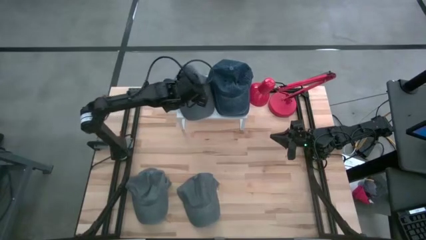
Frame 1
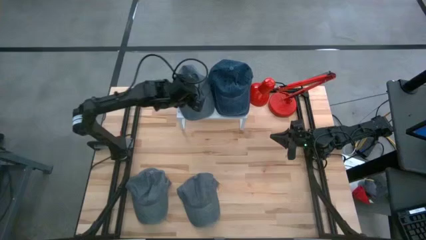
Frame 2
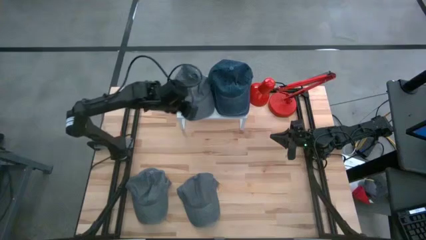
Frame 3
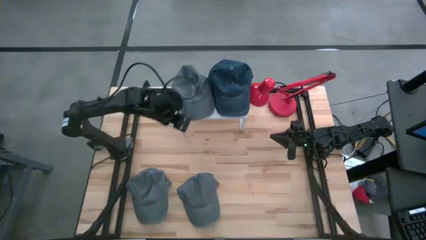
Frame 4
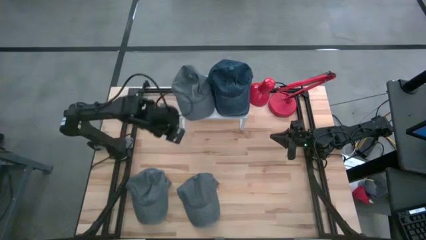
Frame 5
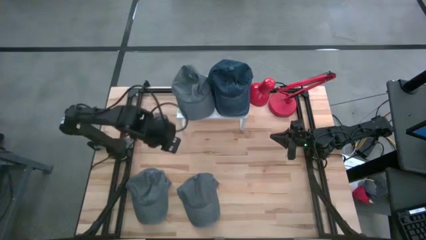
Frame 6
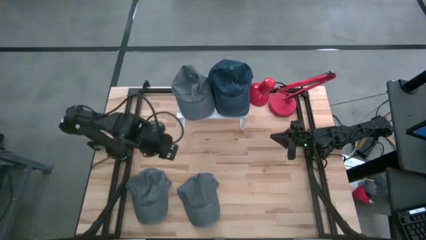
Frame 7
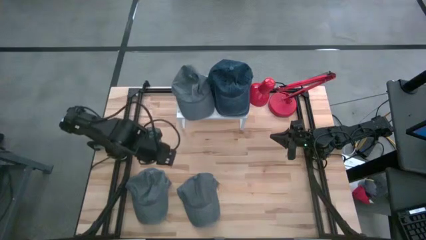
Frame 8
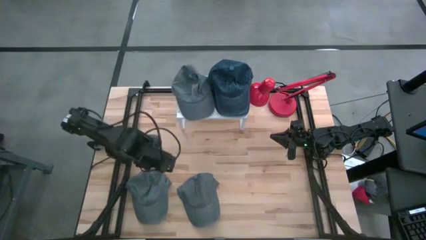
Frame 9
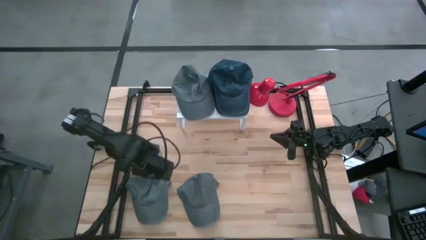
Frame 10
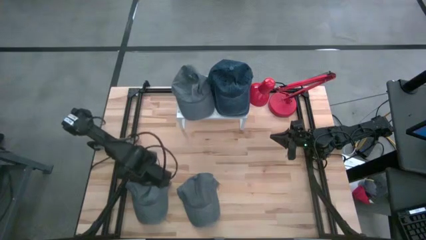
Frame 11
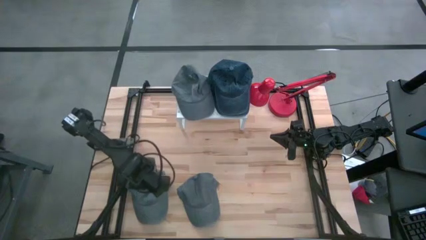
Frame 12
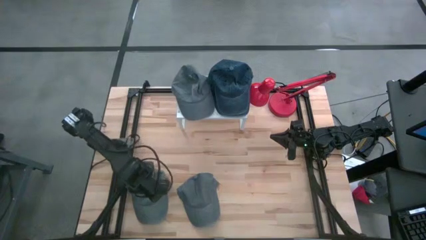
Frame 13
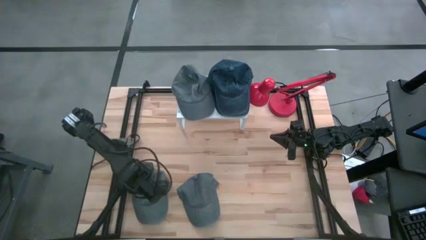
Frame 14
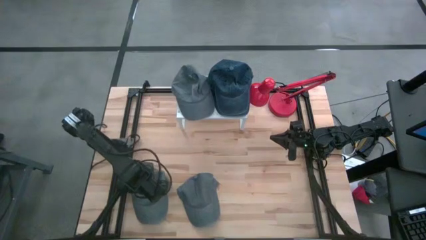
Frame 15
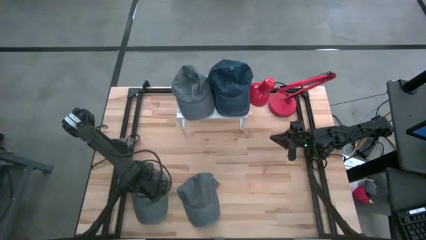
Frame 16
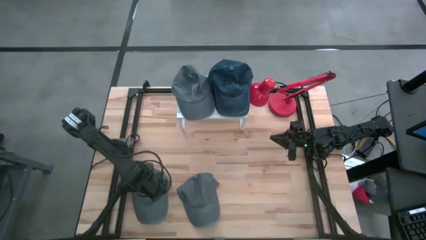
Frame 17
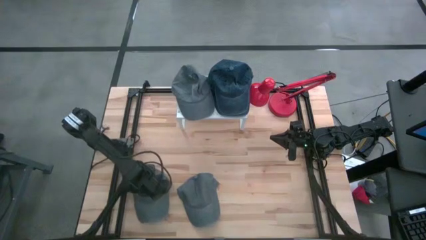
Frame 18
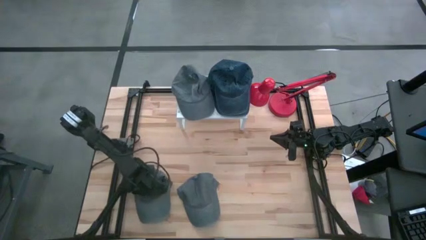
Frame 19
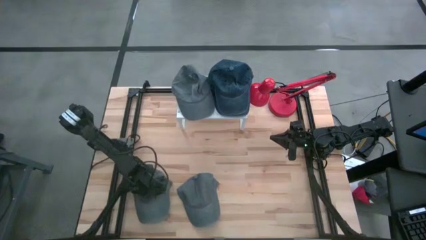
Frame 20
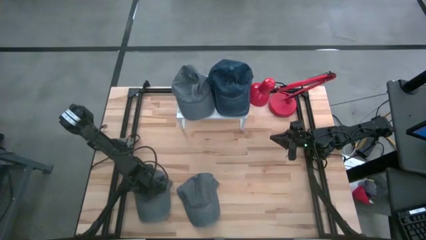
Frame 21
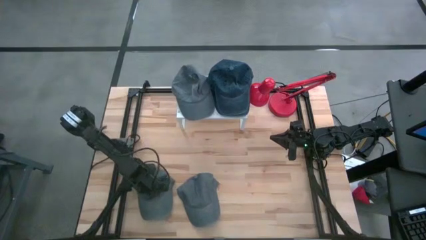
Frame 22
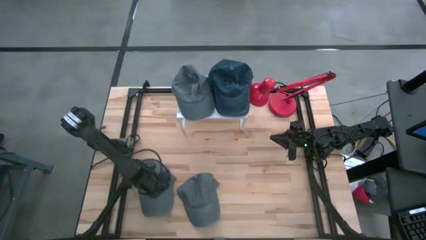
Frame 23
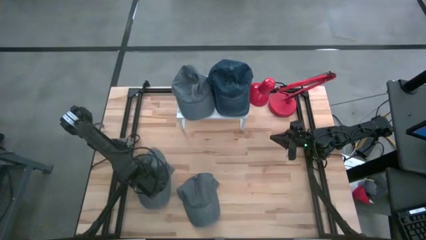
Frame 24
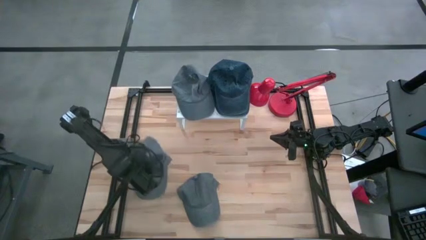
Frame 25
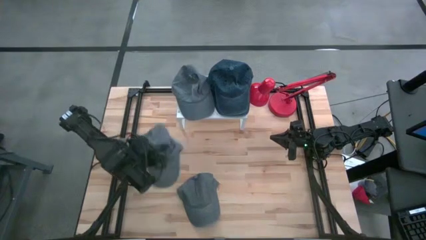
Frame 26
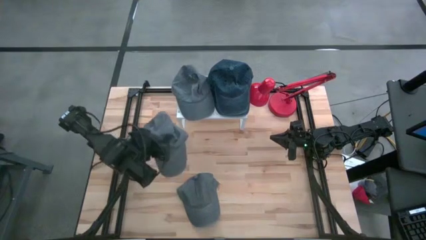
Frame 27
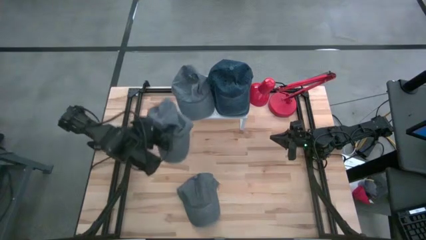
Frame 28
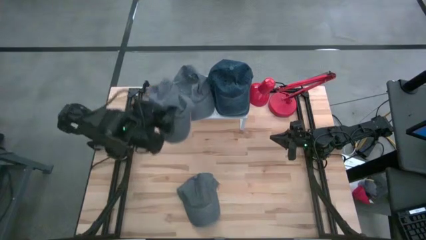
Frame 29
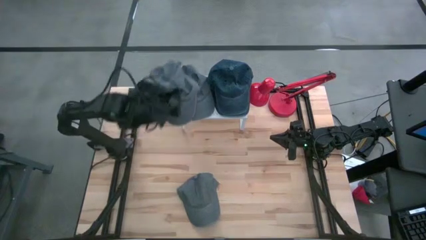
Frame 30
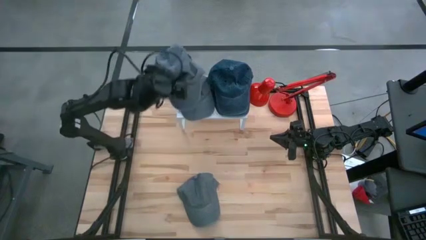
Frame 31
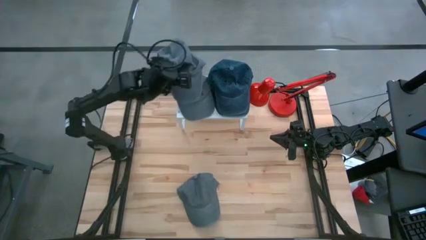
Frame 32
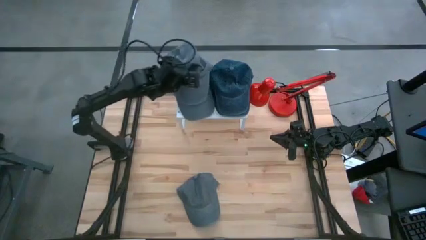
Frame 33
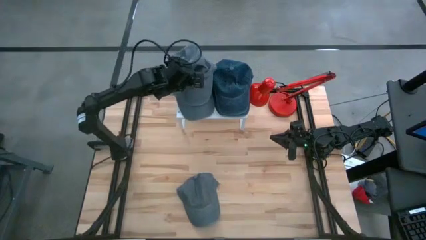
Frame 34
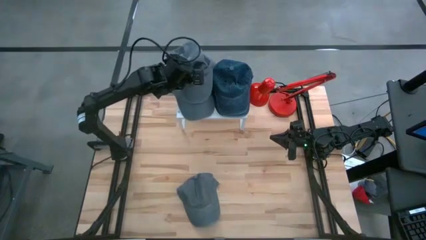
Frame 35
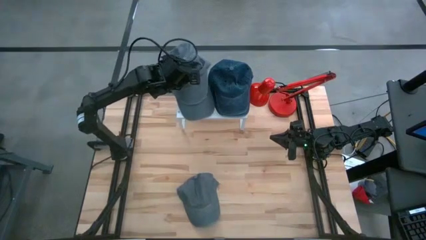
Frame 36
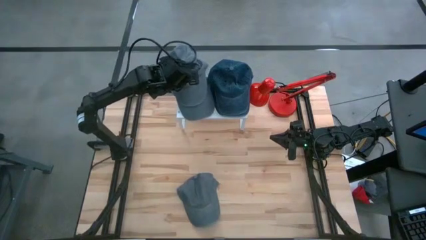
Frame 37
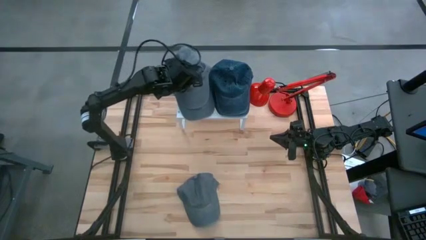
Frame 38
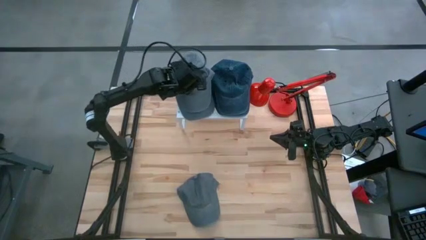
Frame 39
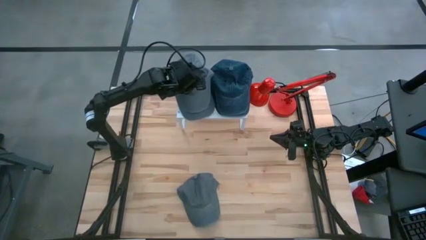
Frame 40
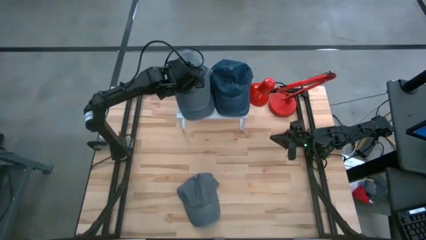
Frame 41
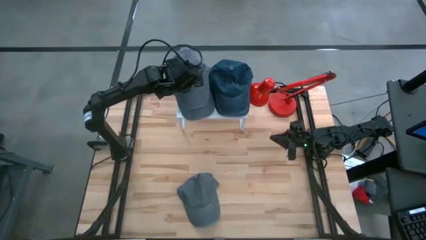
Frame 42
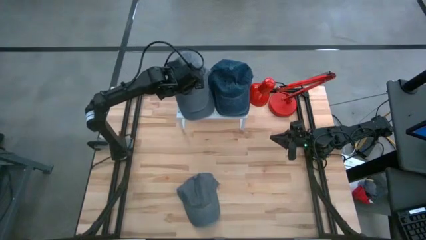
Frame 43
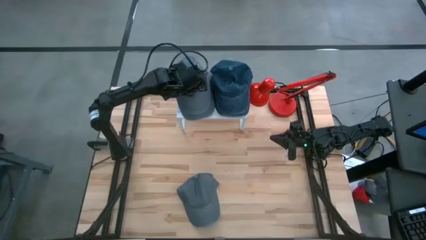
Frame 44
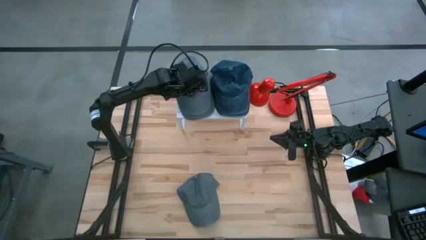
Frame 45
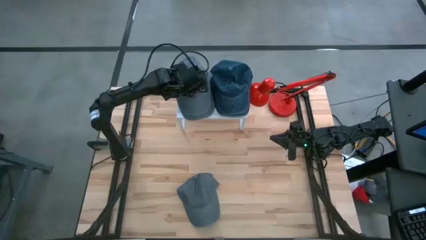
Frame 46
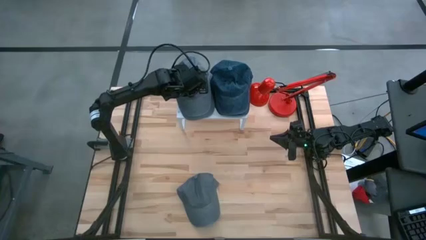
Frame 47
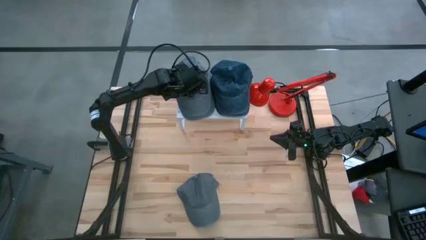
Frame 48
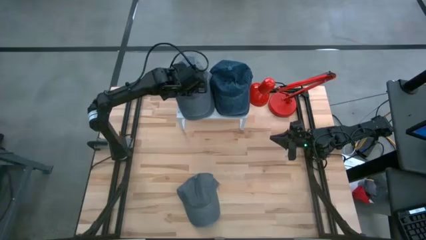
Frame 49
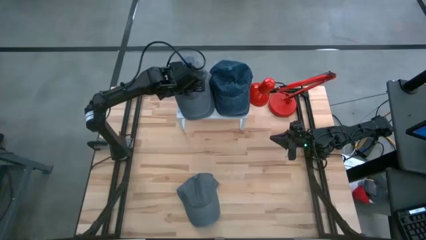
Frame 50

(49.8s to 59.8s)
Task: Pick & Place hat
Put the left gray cap on top of the other gray cap on the shelf

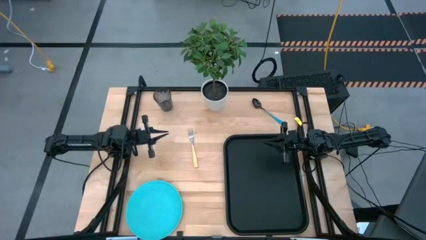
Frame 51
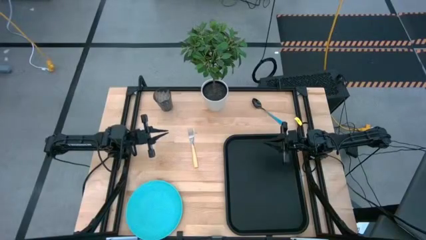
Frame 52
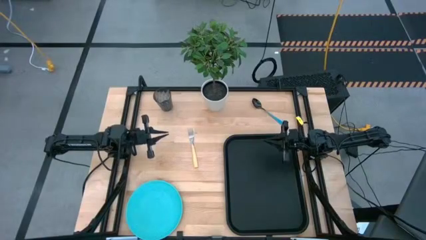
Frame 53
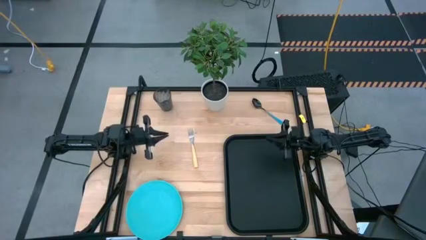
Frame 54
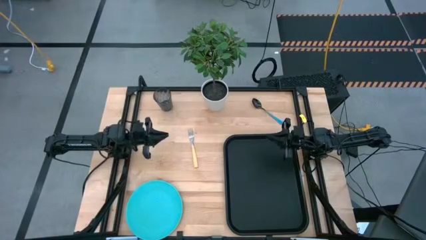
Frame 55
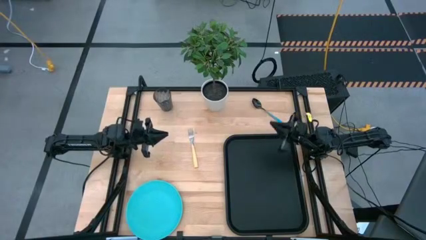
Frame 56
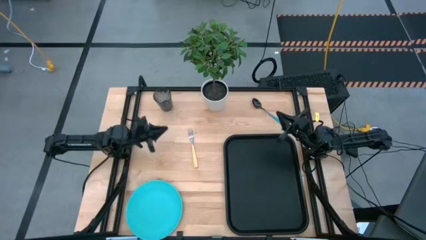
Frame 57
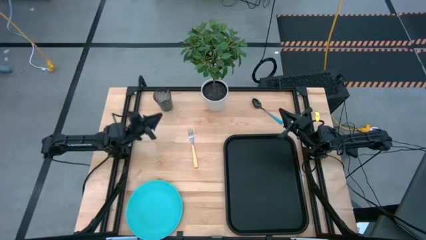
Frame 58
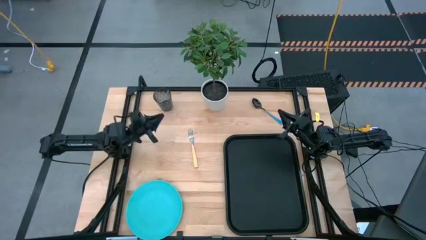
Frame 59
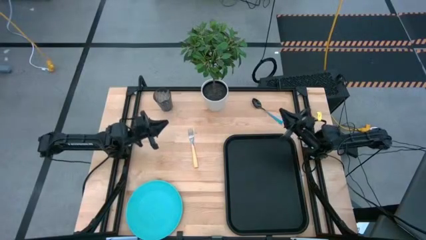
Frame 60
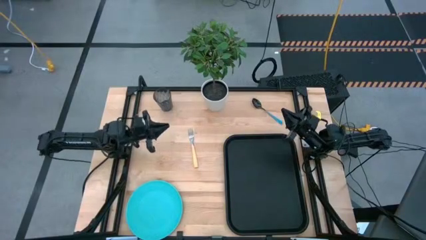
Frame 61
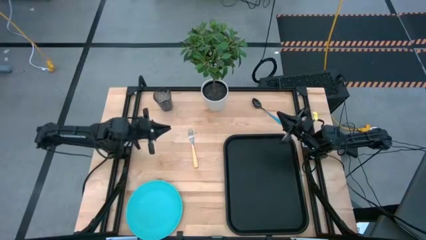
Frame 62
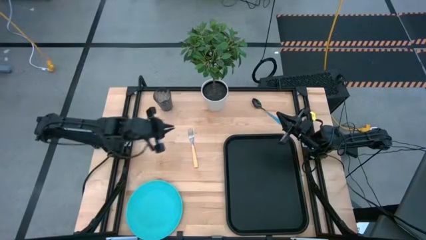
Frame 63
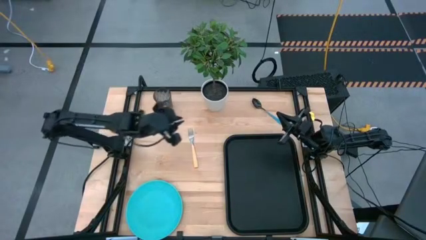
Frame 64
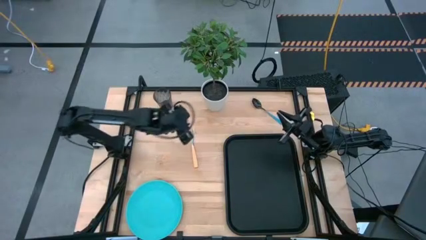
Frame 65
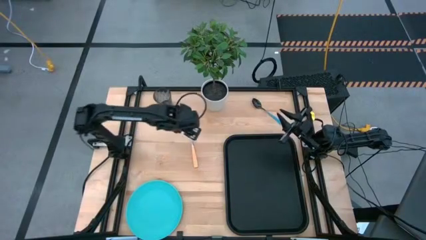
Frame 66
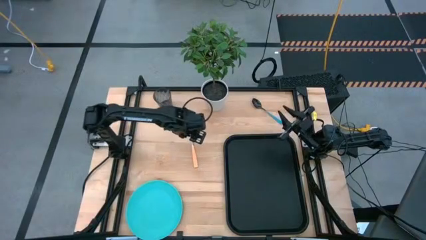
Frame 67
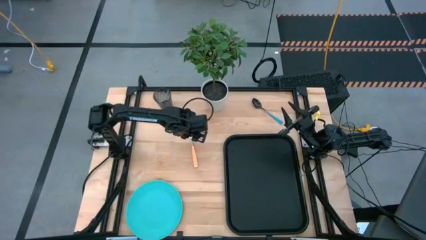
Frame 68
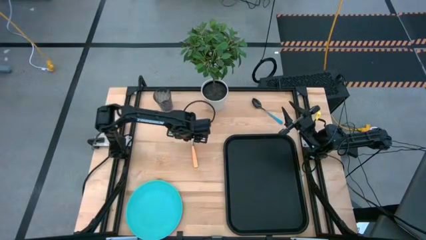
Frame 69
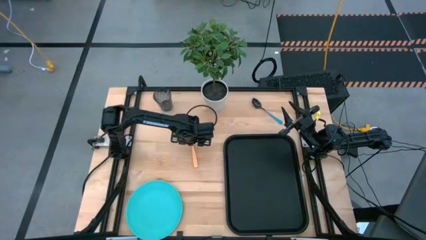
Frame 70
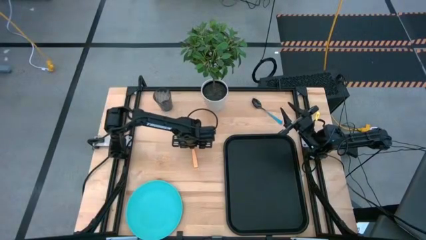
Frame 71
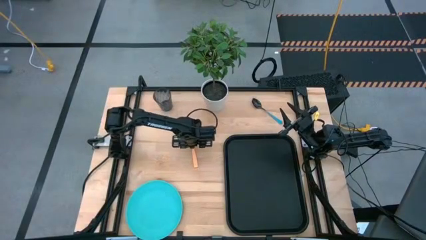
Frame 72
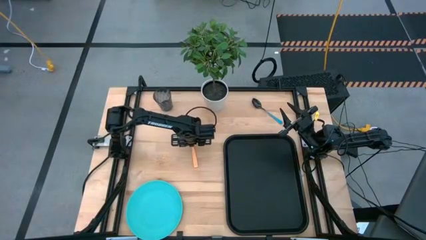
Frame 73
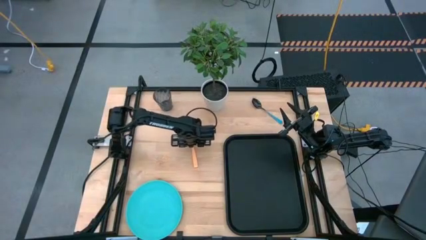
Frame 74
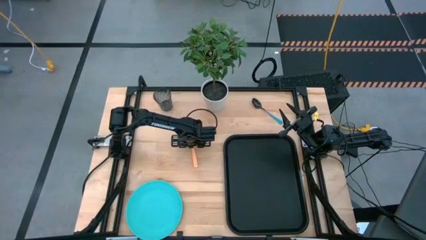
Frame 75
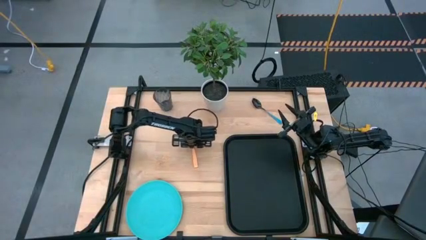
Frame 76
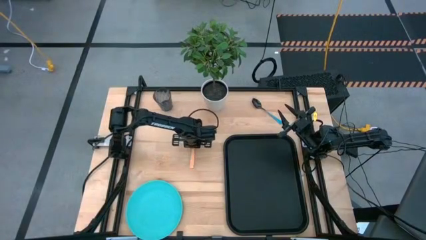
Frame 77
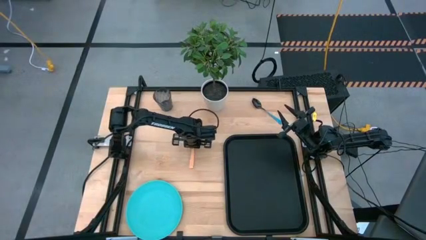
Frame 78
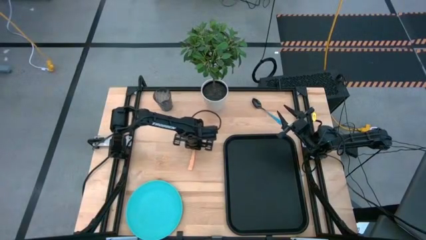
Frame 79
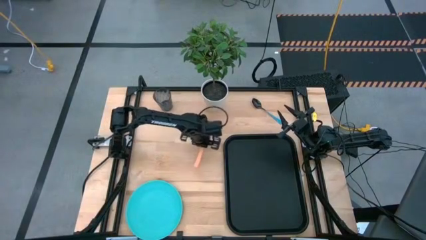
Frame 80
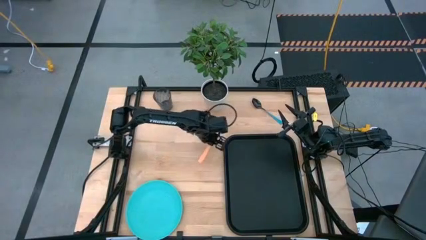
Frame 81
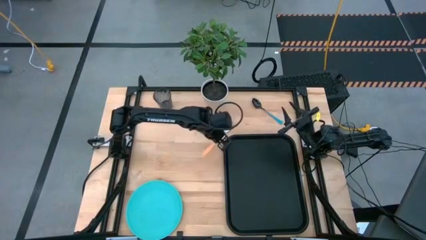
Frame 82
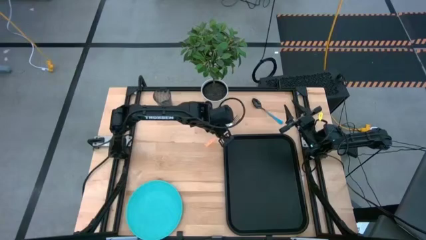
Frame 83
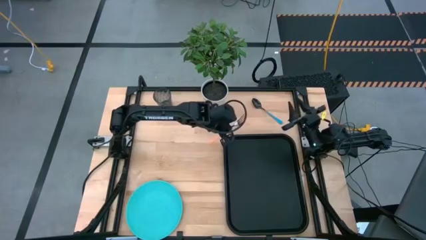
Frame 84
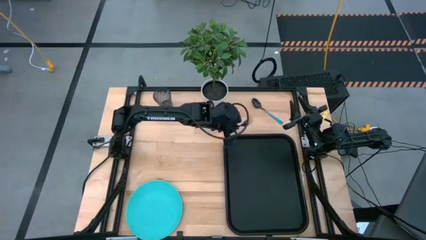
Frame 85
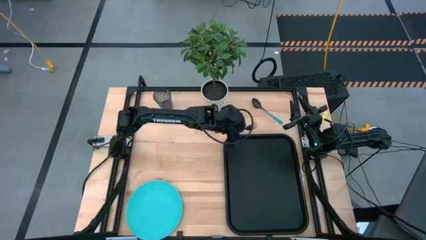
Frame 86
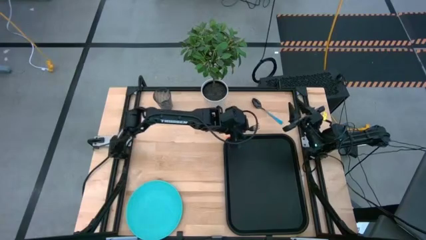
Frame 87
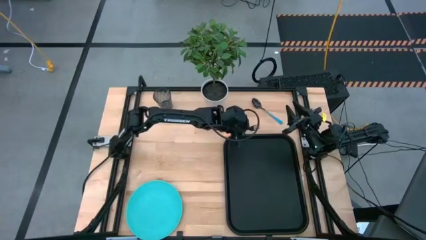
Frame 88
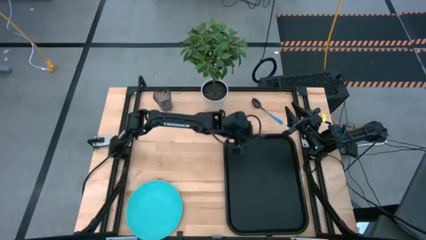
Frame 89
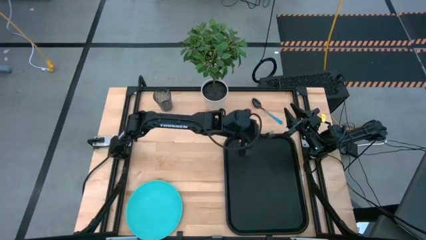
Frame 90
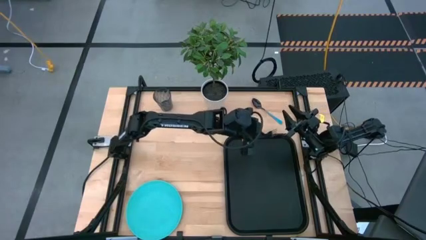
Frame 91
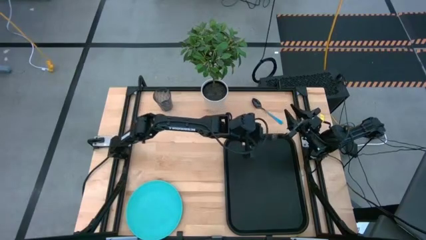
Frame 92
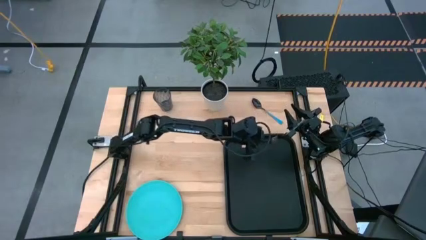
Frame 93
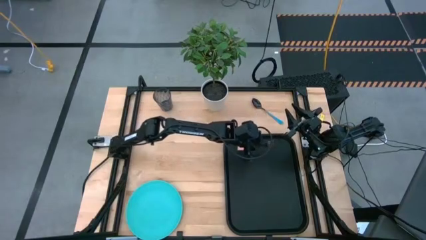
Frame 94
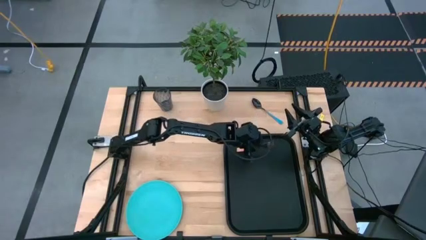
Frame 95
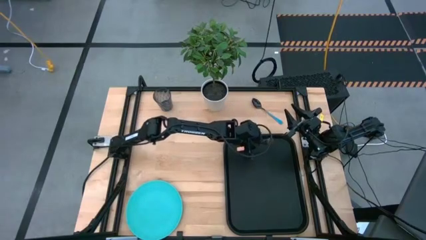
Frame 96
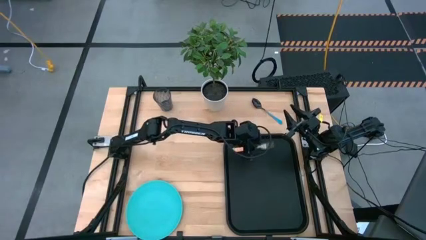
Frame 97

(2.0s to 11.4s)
Task: Pick and place plate/cup/fork/spoon on tray
Put the yellow fork on the black tray
